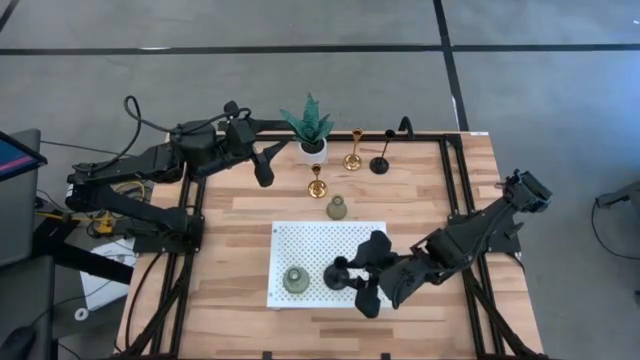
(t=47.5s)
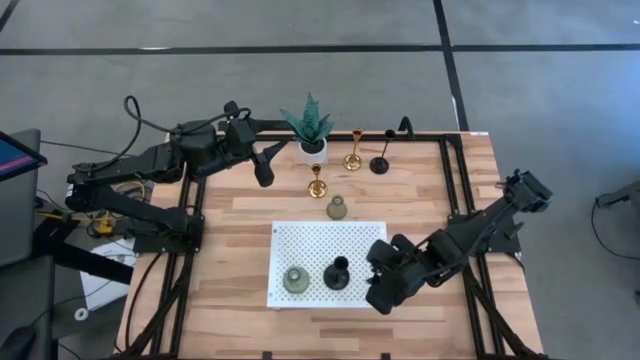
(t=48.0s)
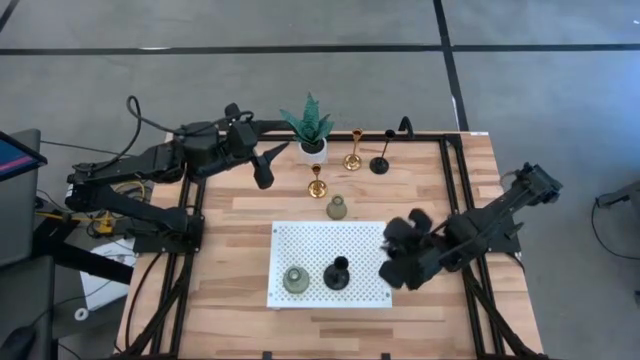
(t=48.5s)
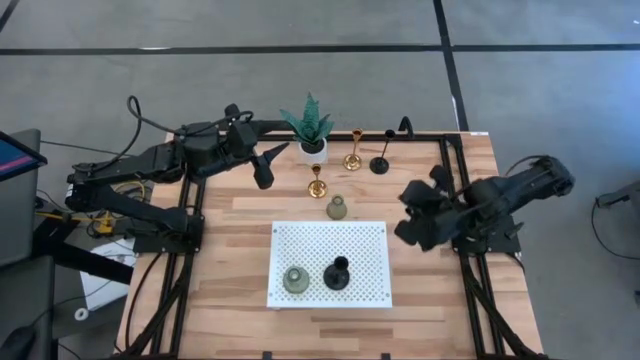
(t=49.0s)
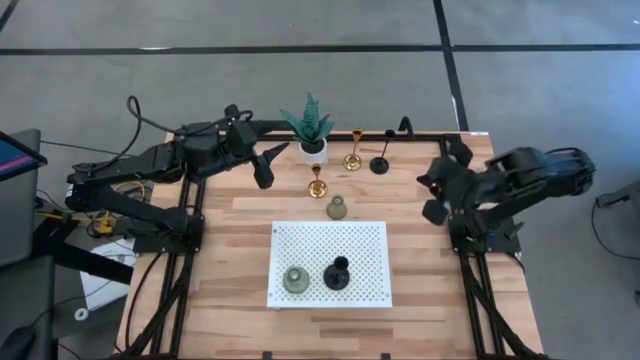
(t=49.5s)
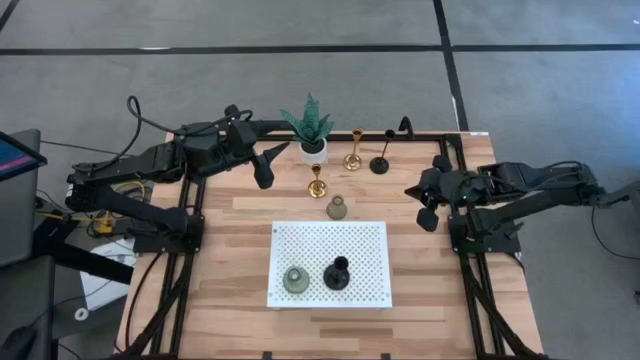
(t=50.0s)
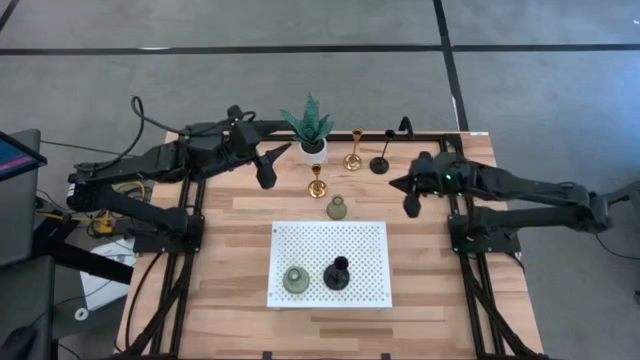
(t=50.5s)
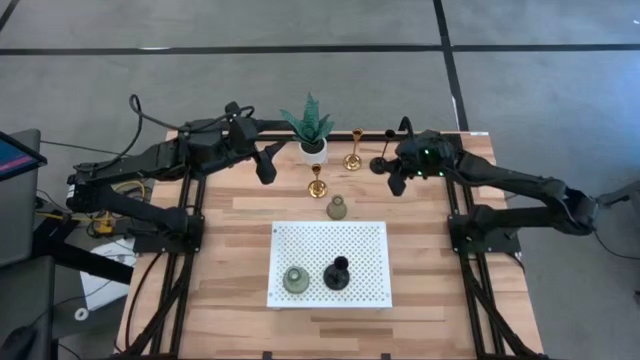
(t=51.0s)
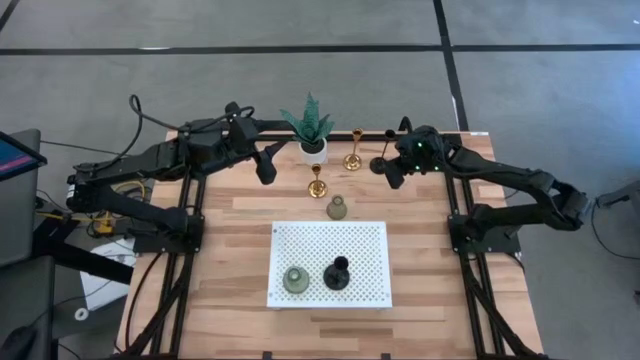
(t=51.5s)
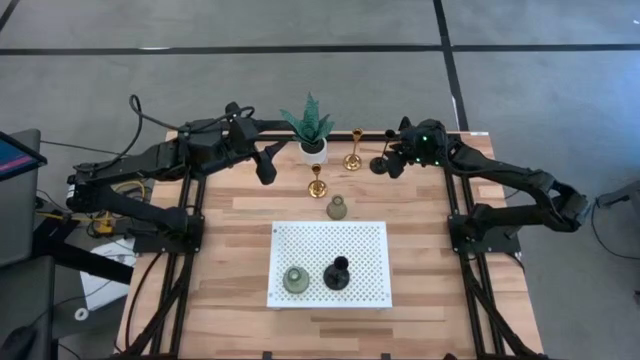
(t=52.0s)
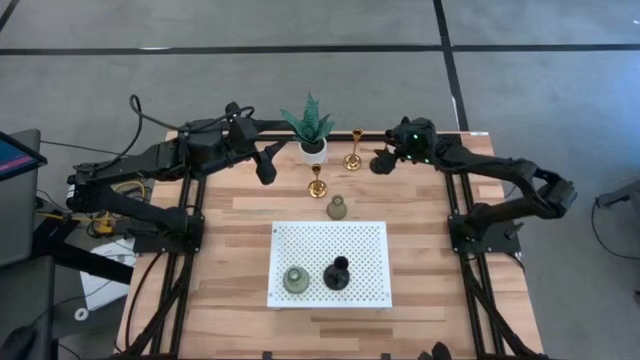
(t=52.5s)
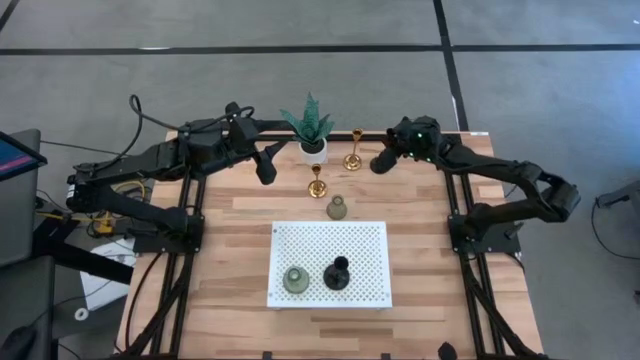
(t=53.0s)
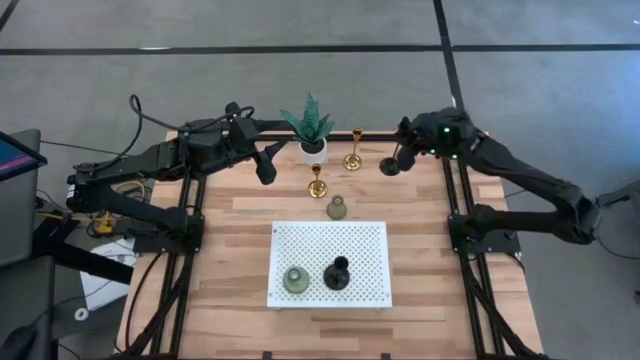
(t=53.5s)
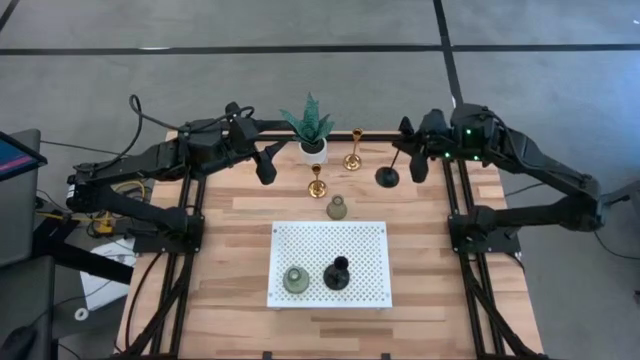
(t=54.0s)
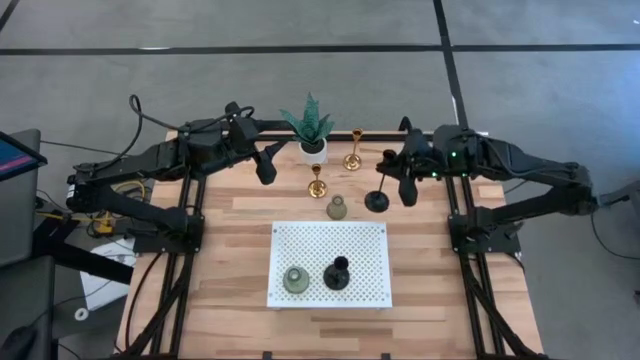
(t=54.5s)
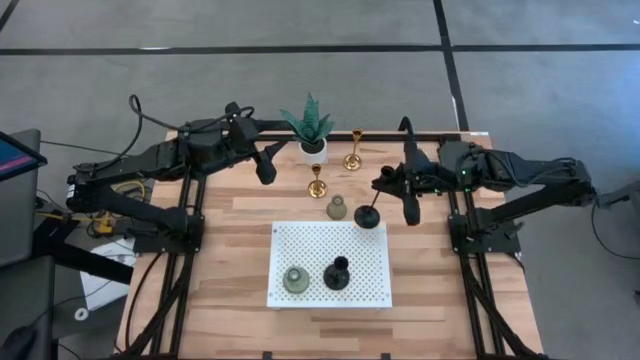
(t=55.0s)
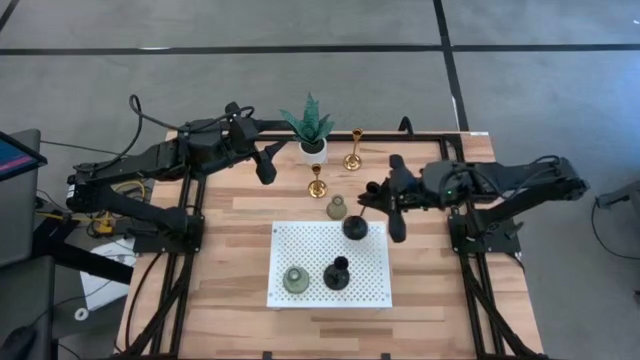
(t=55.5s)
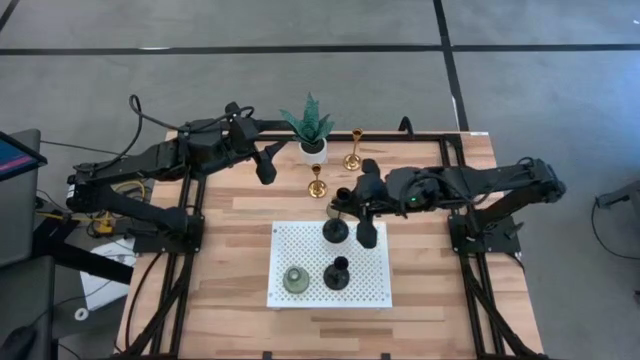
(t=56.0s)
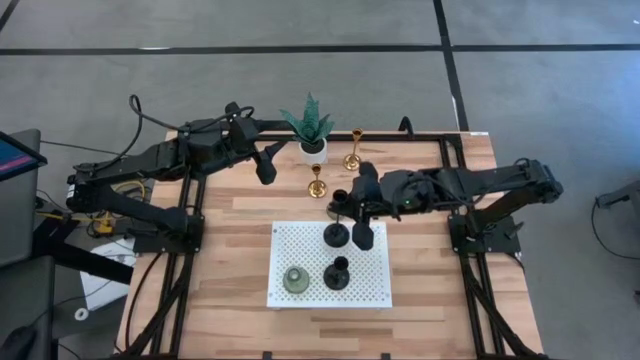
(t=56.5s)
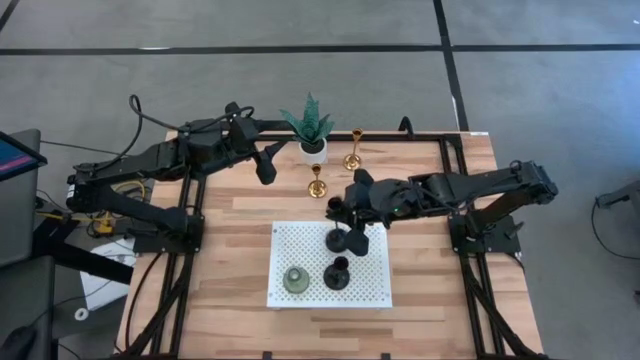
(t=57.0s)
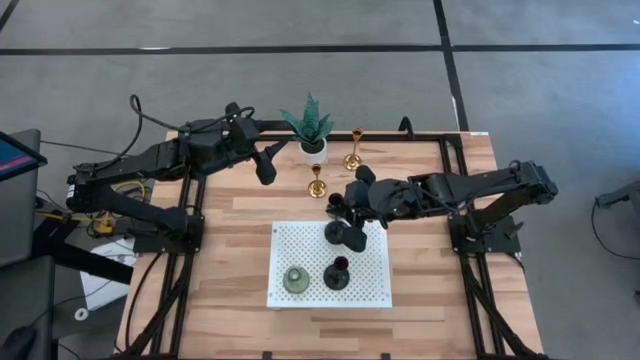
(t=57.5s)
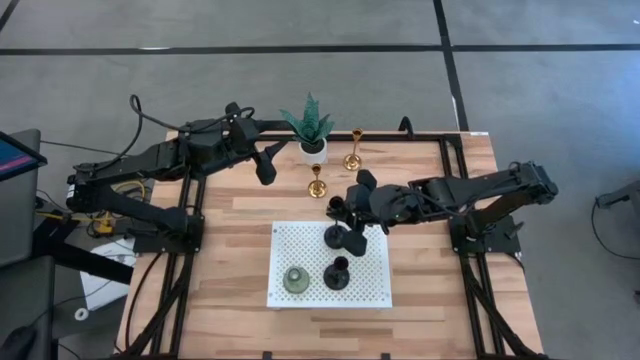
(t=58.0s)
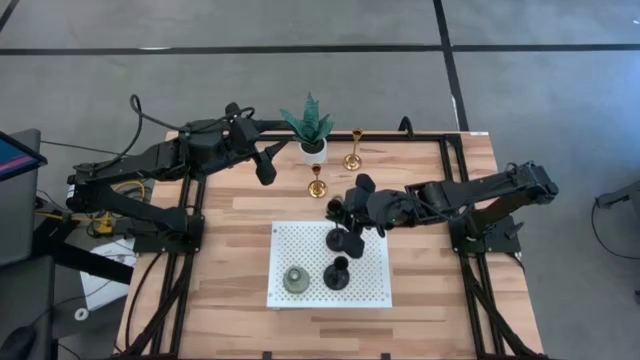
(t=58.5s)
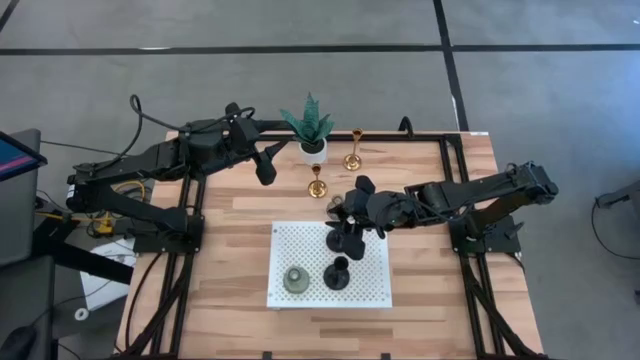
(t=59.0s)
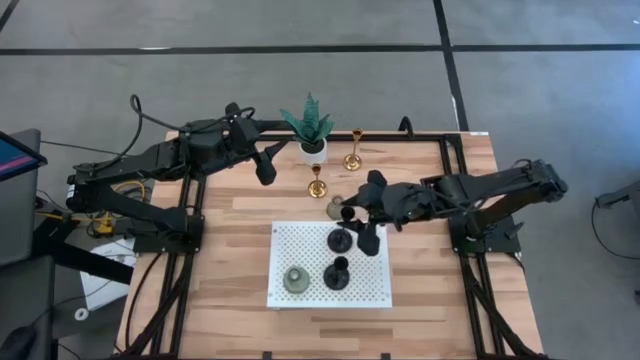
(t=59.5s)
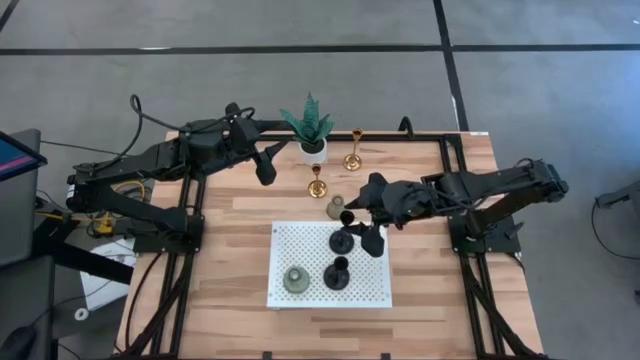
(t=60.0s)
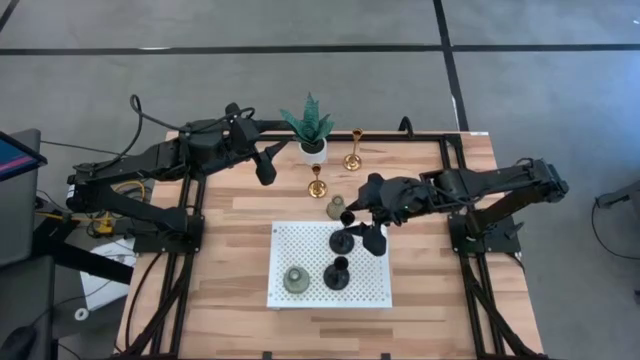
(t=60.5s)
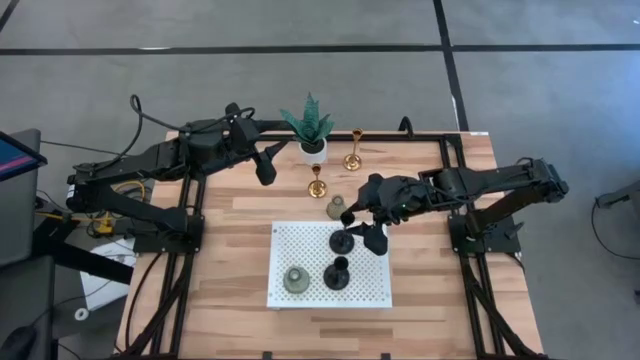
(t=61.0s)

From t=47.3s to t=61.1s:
Task: Pick & Place candle stick holders
Align the black candle holder with the other black candle holder on the shelf

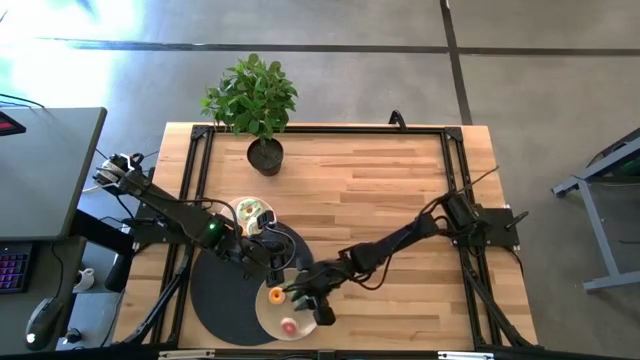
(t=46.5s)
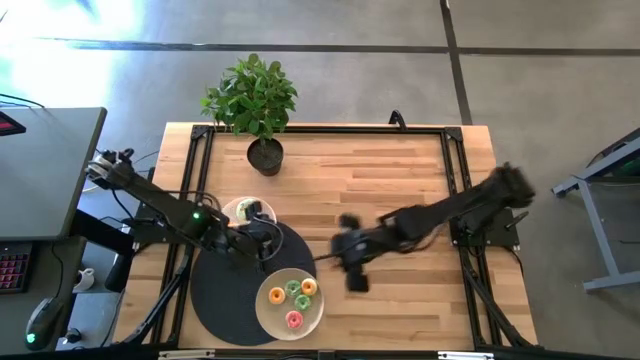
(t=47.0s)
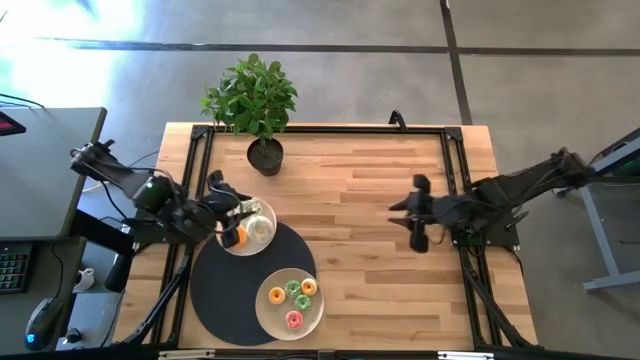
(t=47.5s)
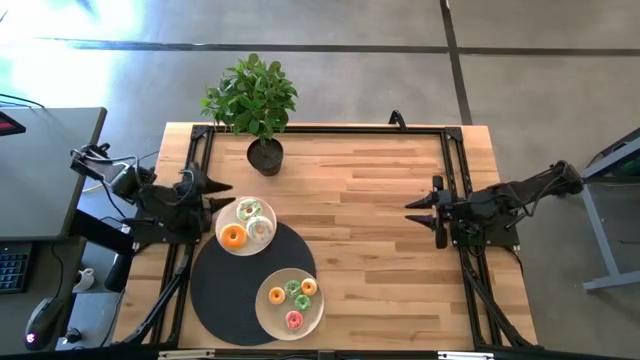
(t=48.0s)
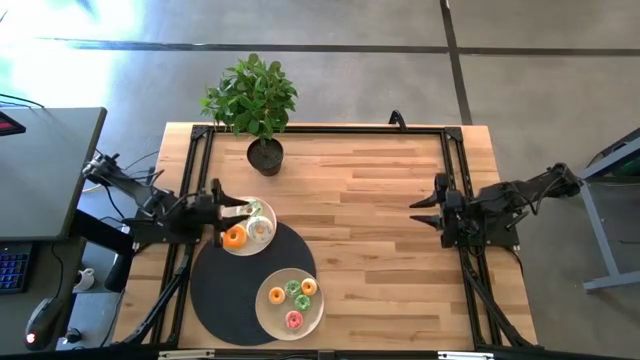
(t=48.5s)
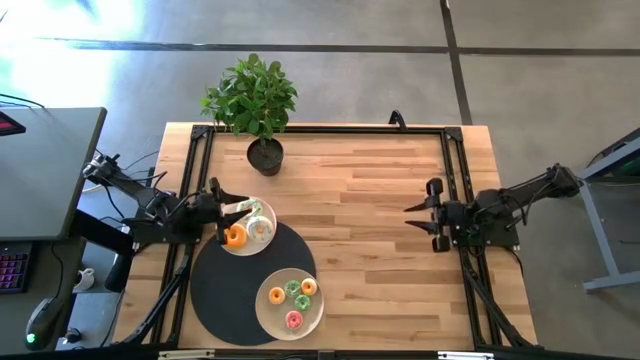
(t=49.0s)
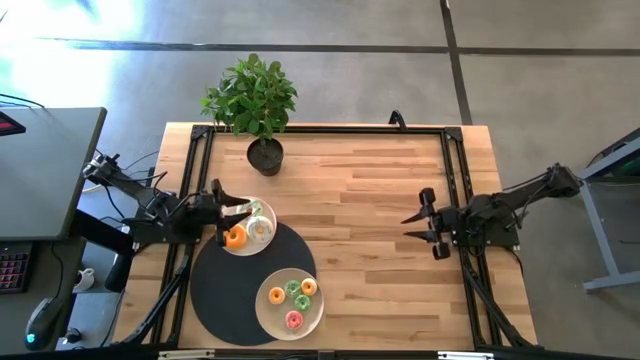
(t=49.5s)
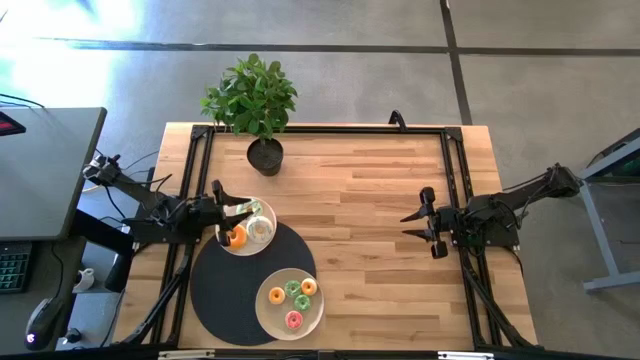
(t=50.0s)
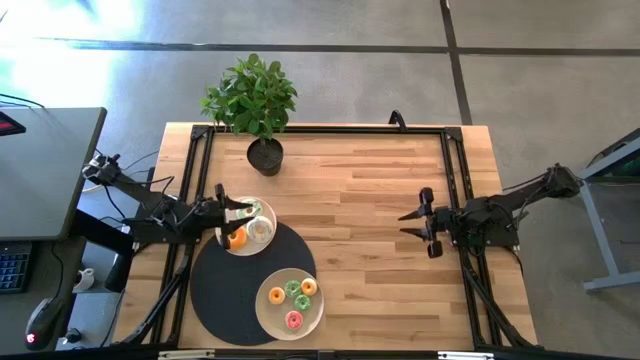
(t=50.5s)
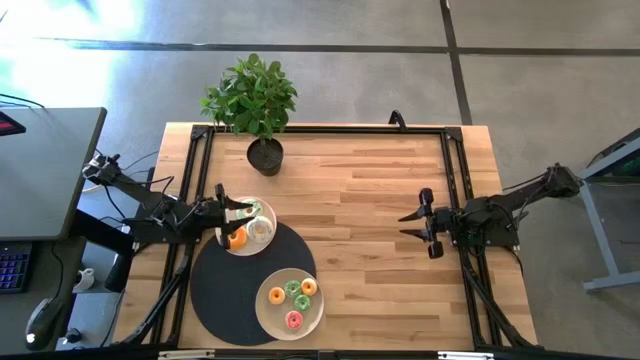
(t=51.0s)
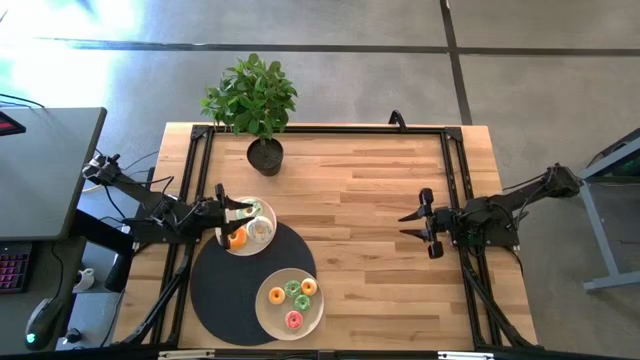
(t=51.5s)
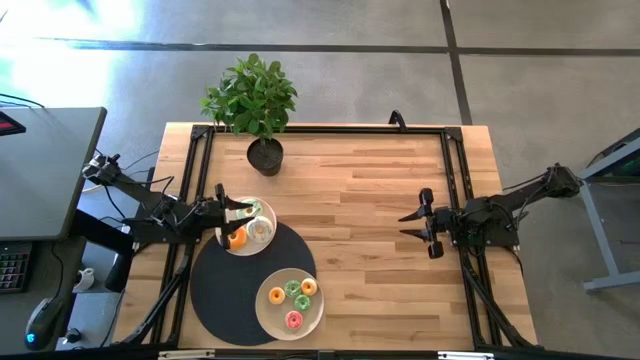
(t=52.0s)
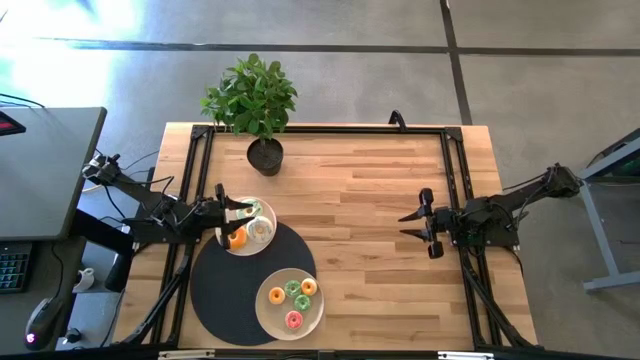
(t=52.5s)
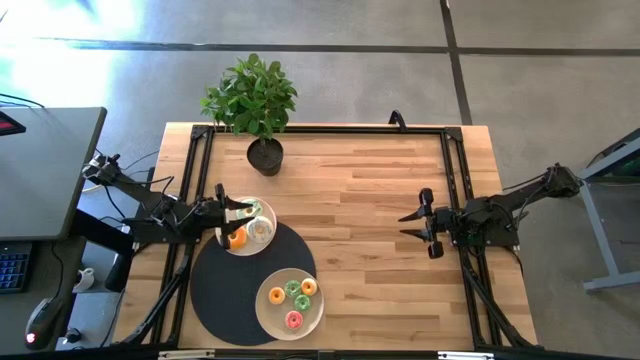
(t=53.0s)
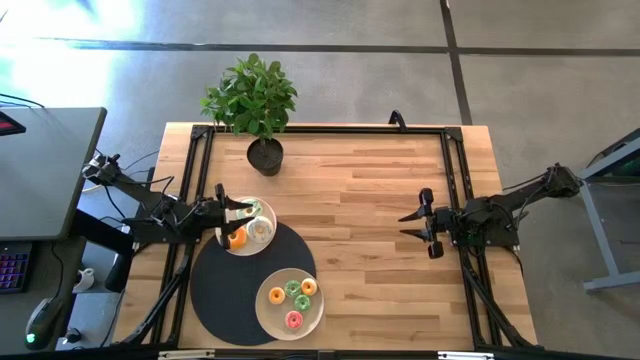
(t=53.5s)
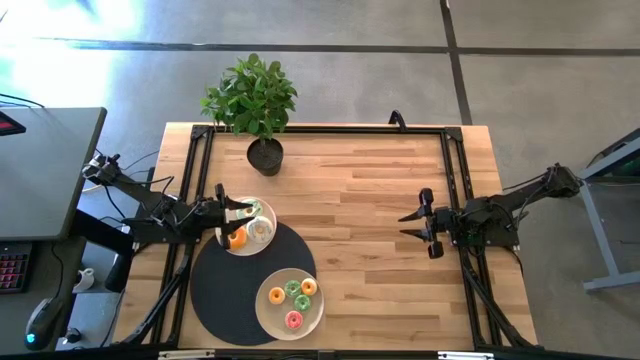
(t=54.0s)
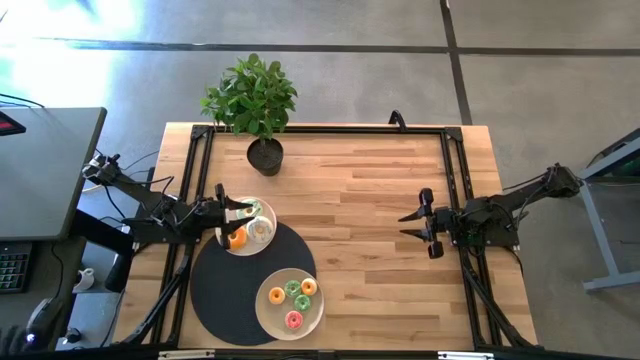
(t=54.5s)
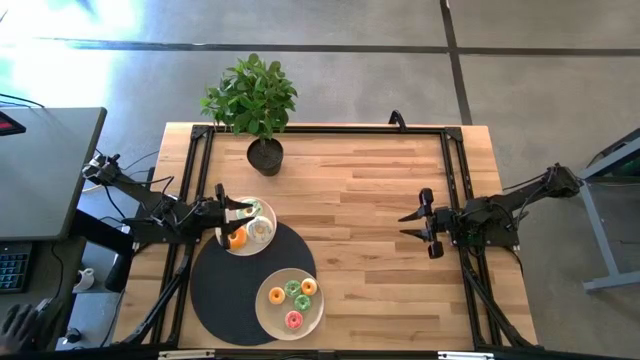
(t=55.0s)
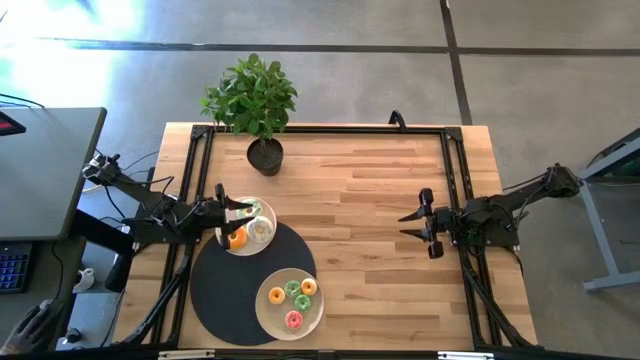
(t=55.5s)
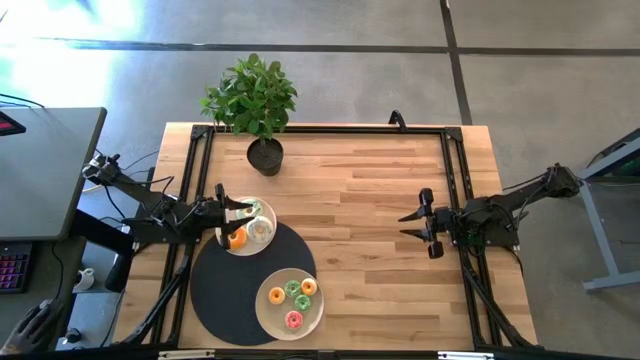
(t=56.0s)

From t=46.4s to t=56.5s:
Task: Pick & Place donuts
Return to Home Position
